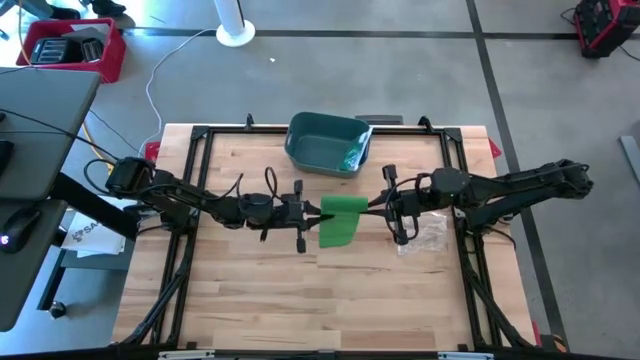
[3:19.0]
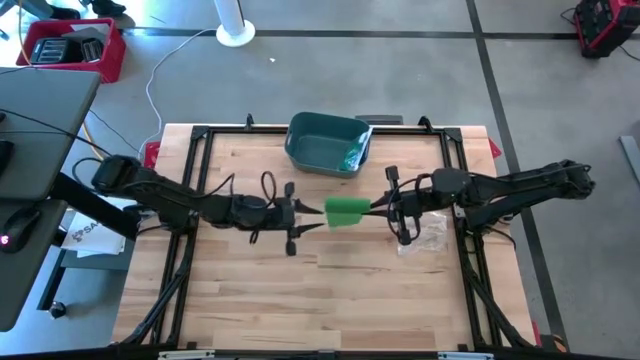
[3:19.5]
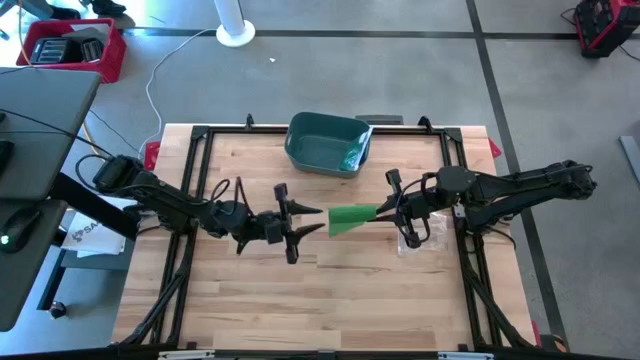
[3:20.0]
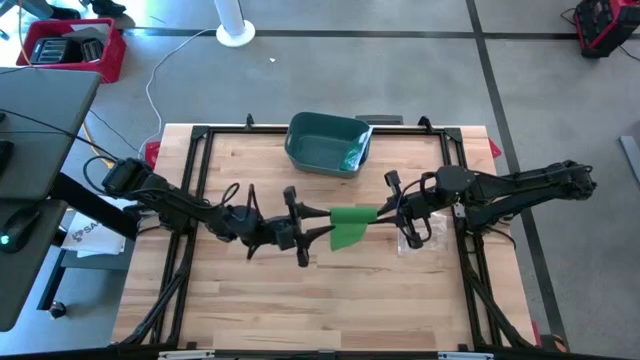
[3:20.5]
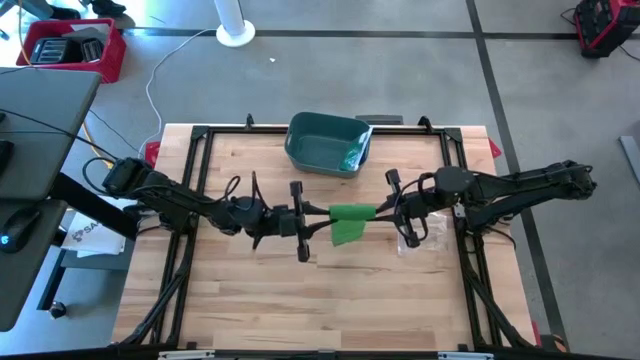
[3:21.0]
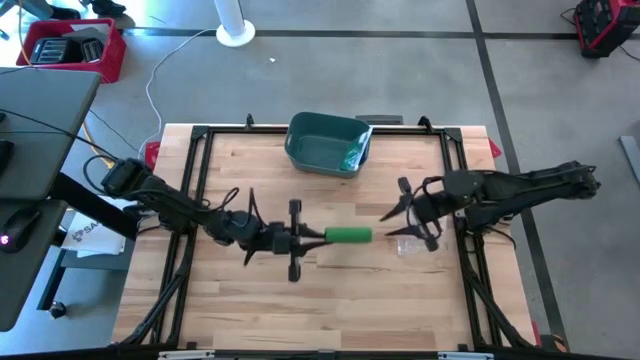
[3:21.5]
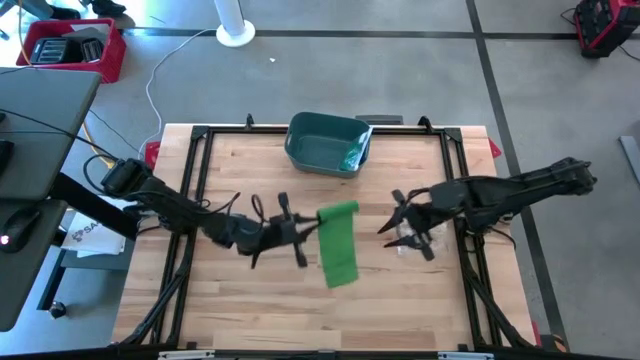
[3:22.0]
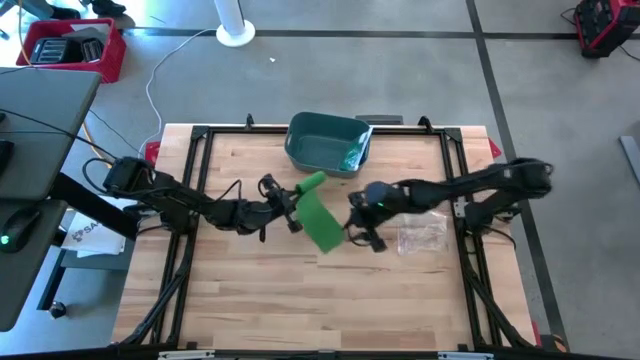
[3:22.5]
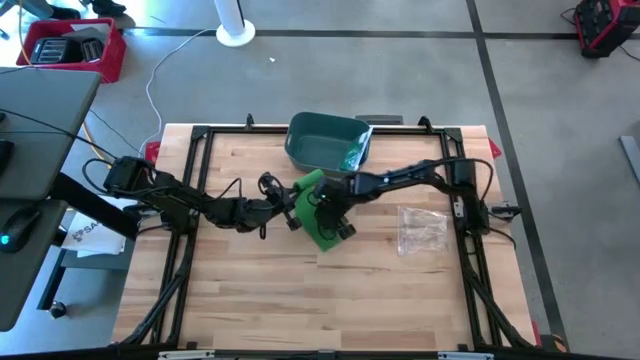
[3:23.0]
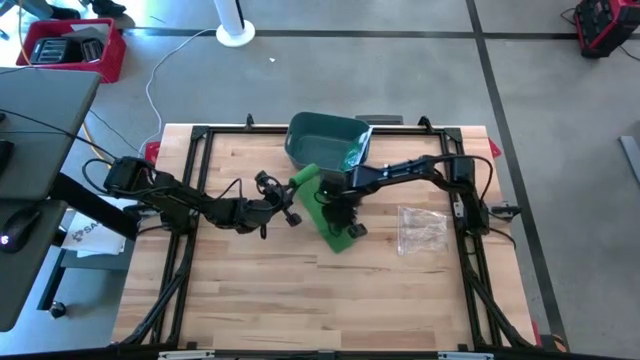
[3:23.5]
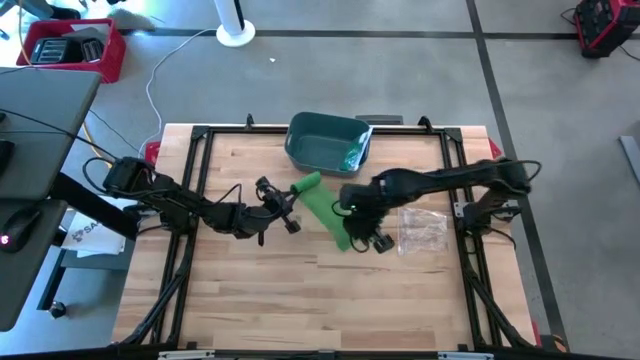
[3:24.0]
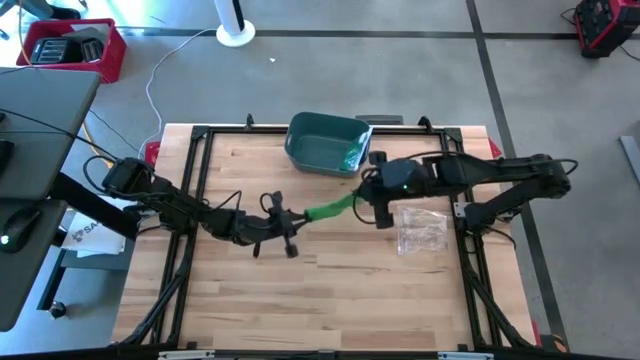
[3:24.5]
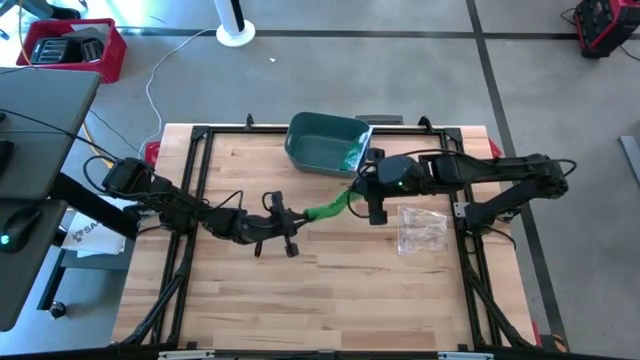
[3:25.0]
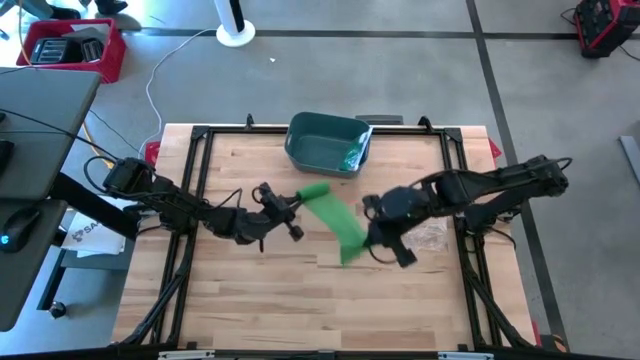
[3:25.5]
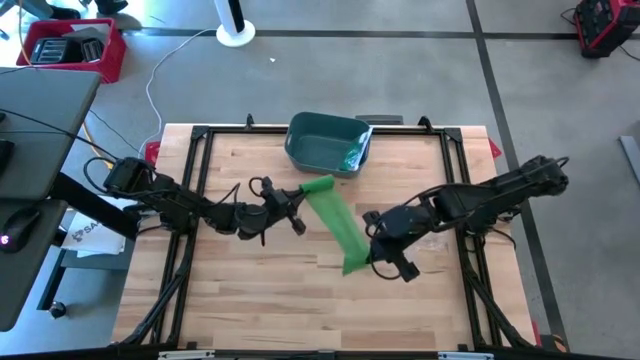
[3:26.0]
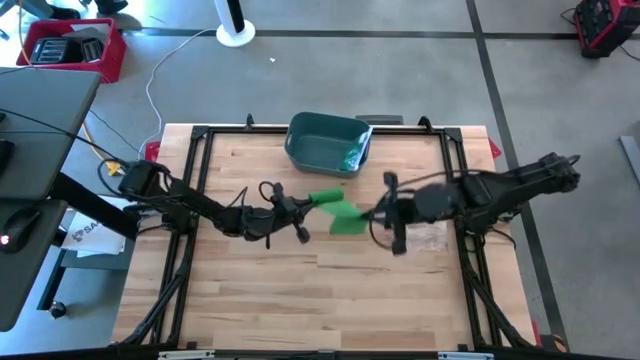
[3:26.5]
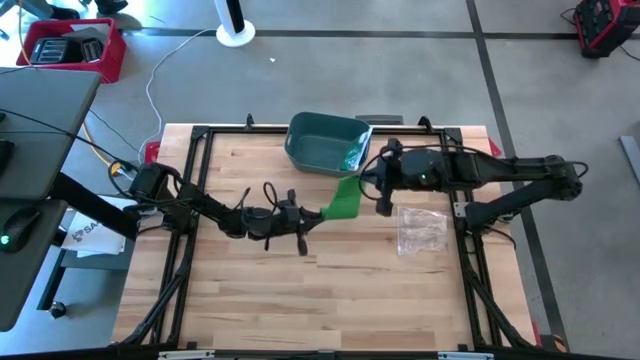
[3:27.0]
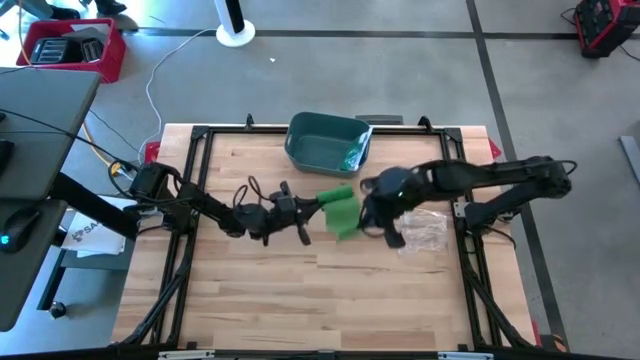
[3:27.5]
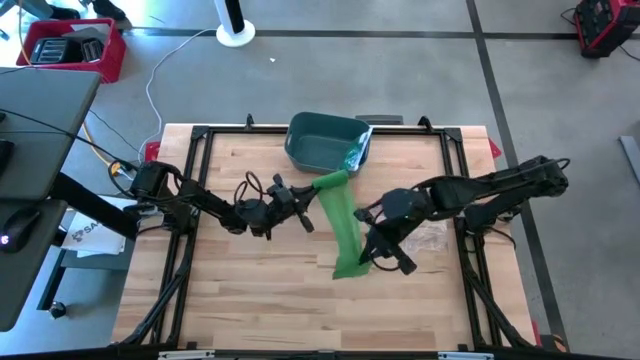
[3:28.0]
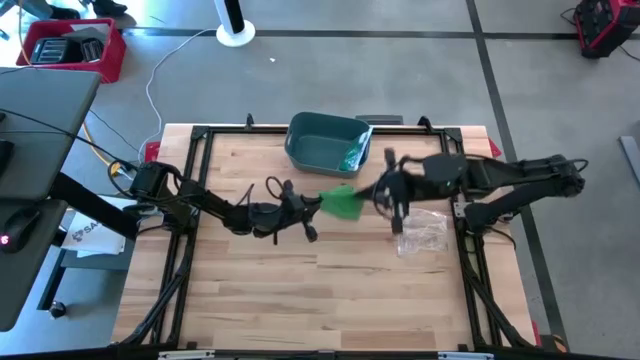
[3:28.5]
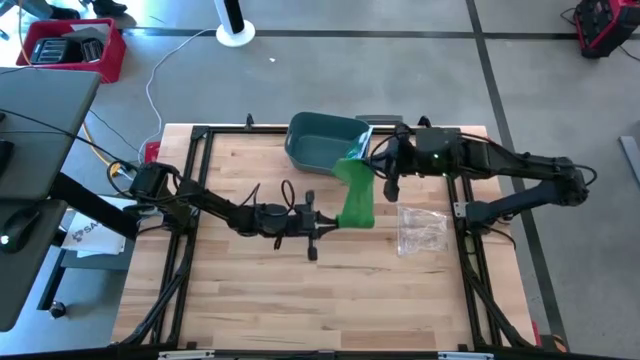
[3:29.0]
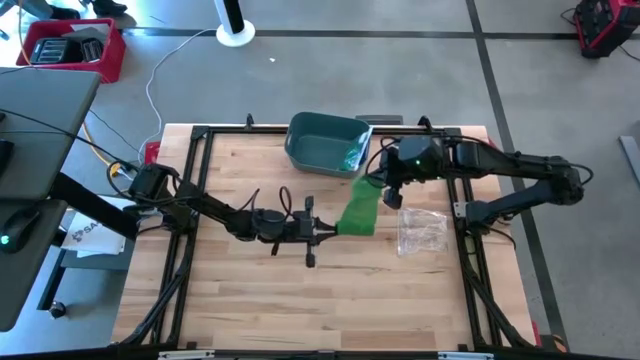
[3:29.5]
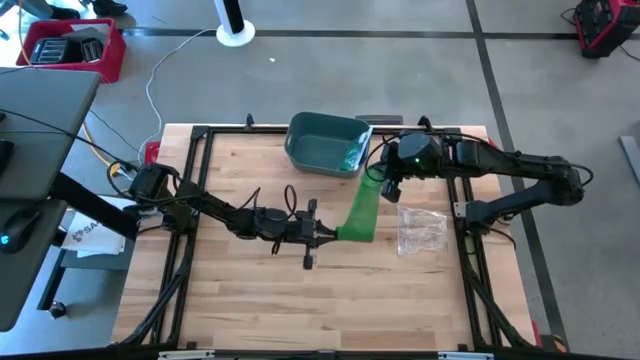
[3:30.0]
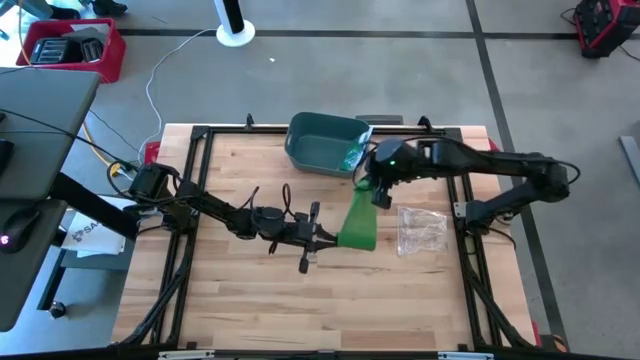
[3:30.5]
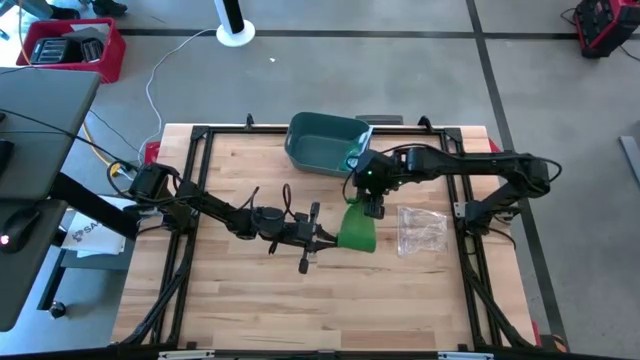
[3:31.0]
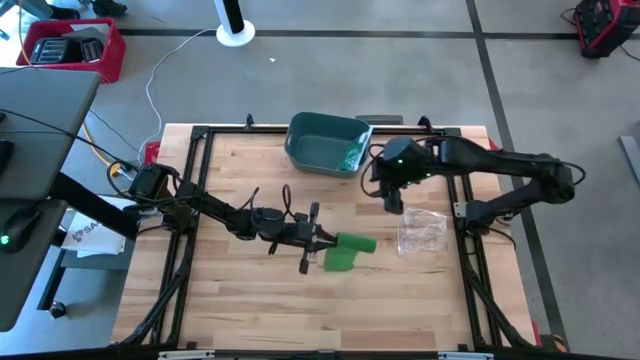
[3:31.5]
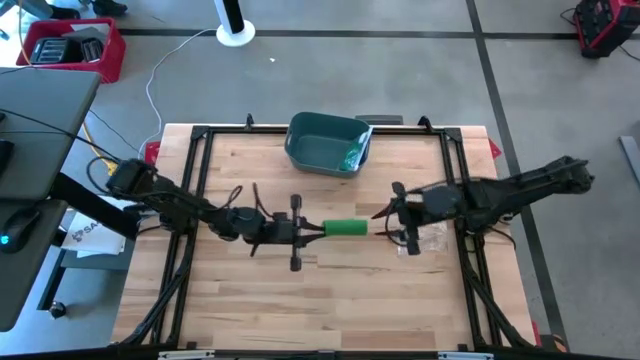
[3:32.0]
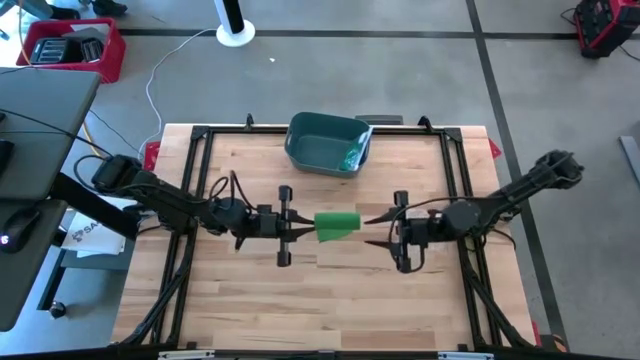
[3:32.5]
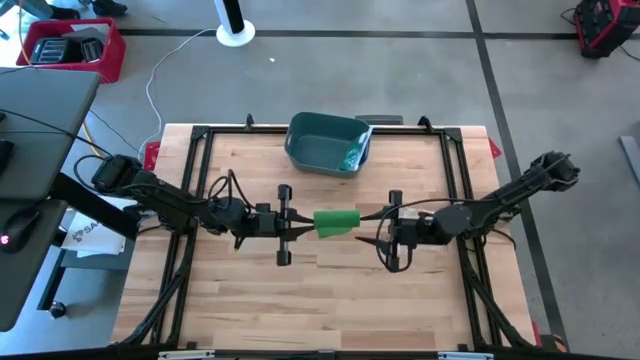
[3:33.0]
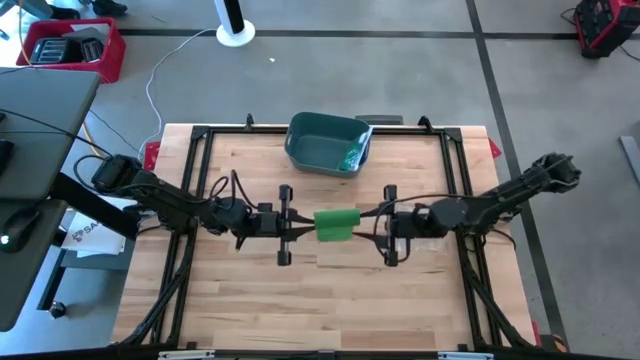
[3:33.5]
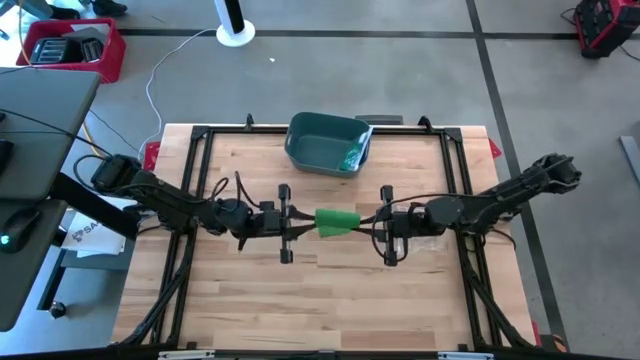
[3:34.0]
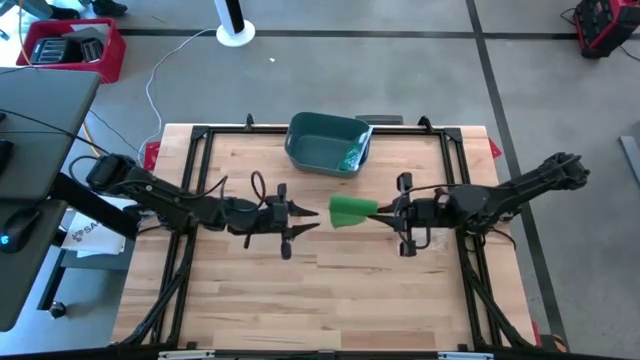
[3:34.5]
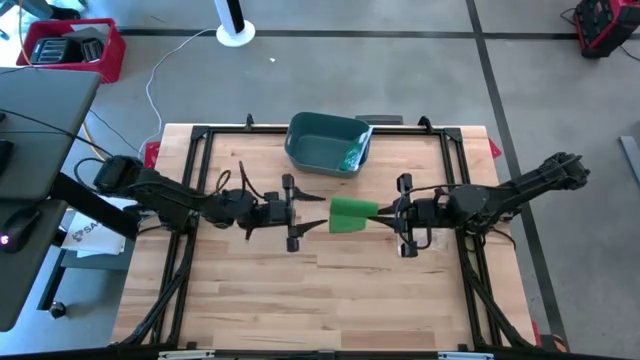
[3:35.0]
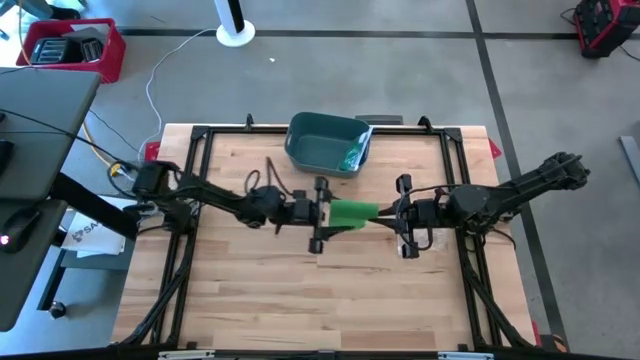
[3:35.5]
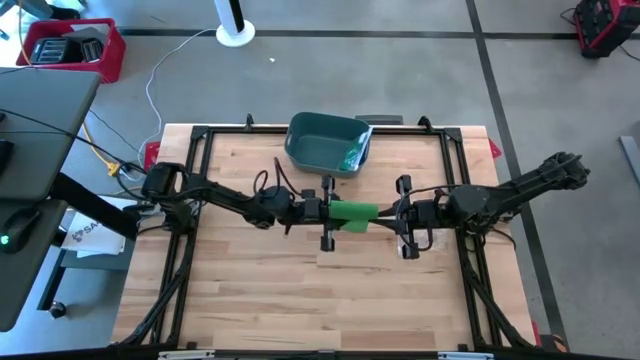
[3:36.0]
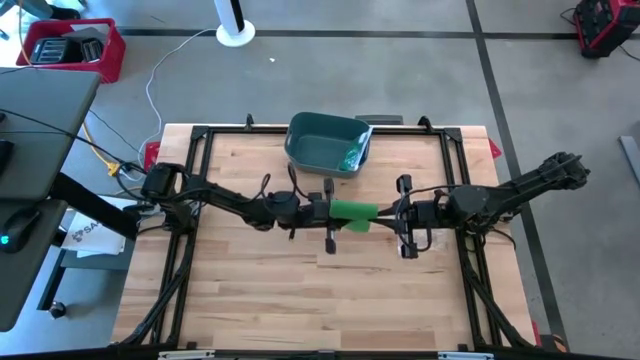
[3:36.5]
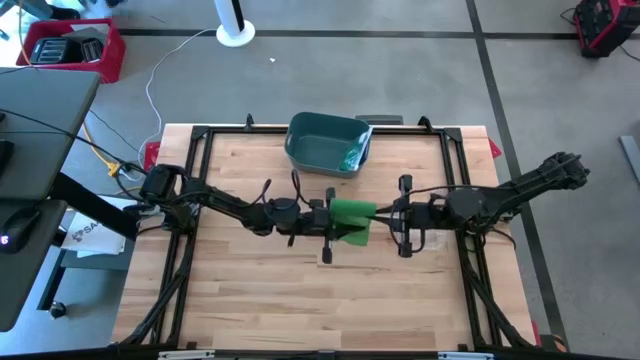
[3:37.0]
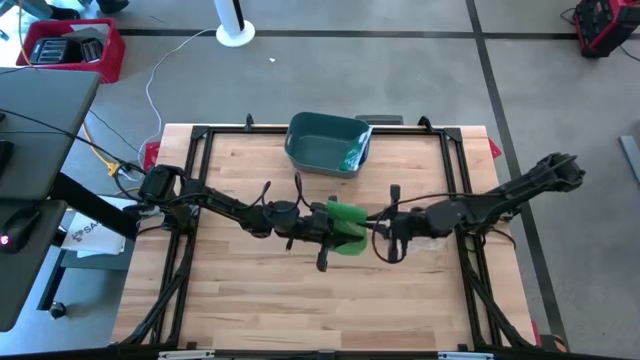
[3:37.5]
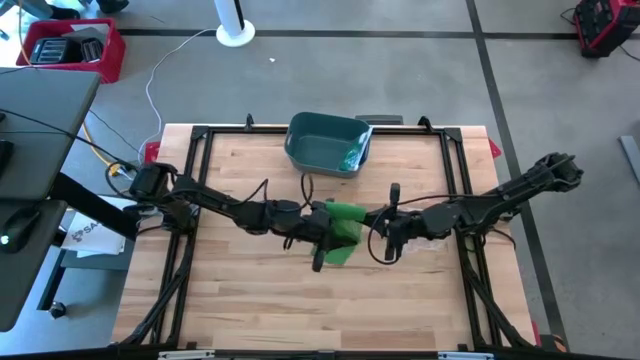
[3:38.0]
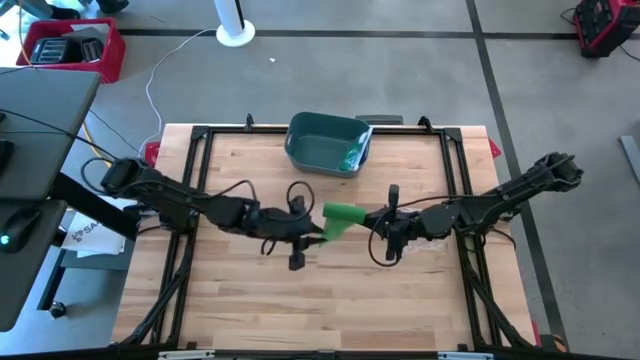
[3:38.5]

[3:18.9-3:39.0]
Task: Roll bandage
Roll the green bandage
